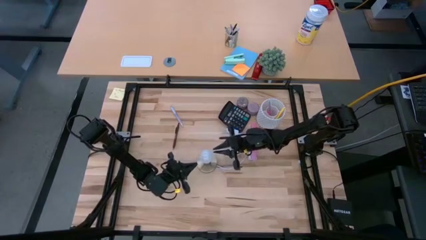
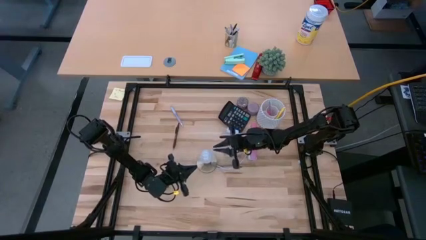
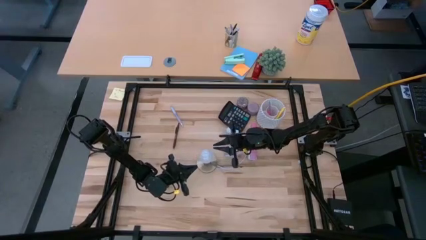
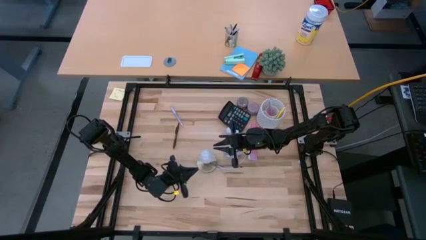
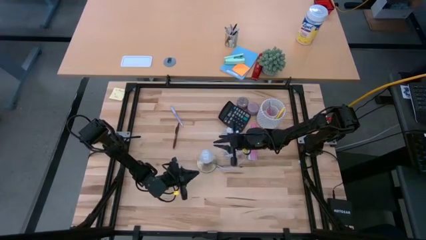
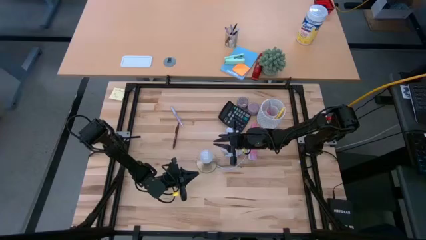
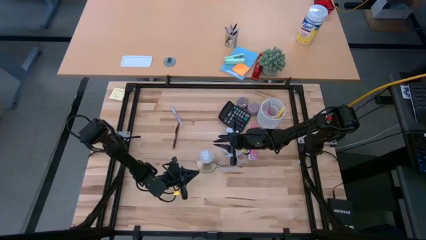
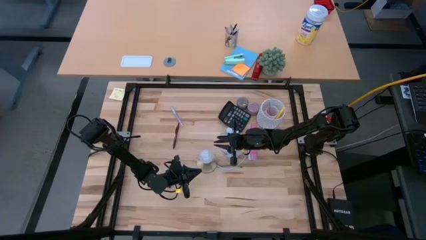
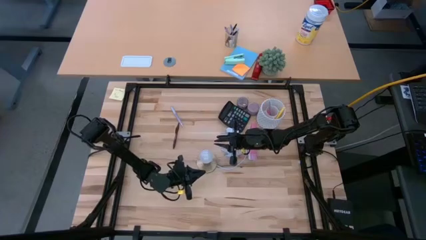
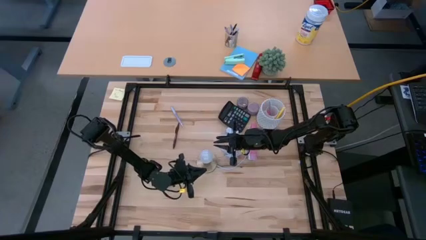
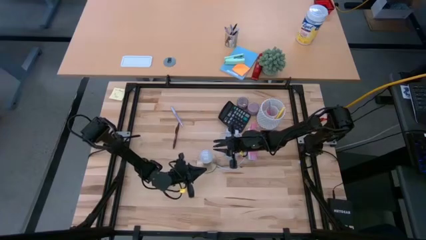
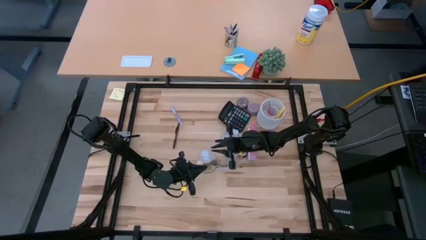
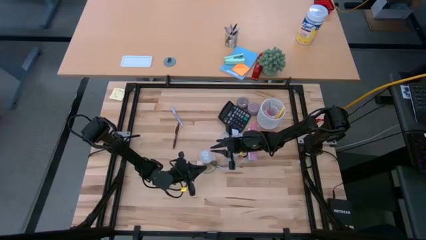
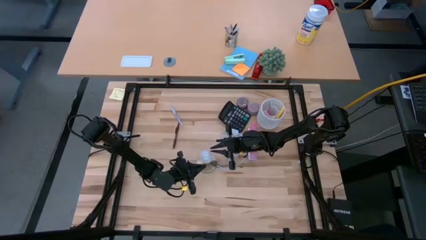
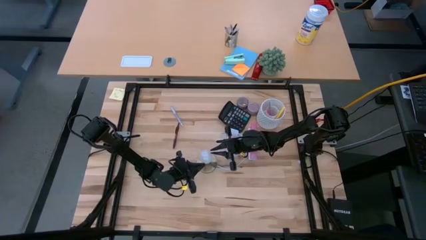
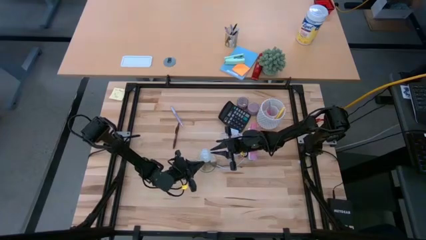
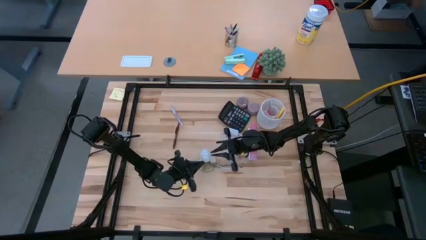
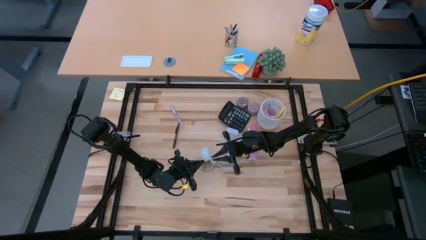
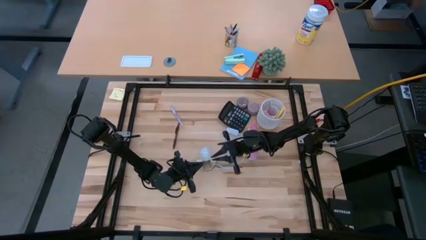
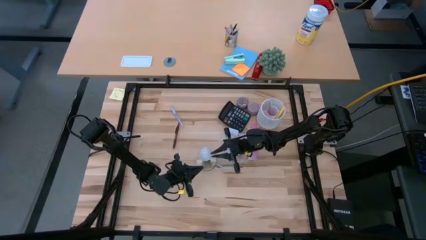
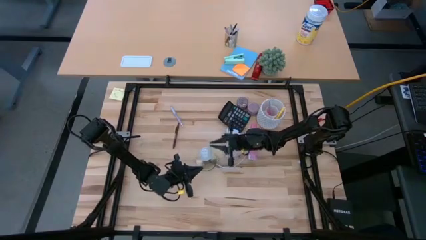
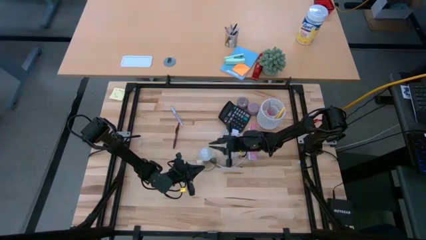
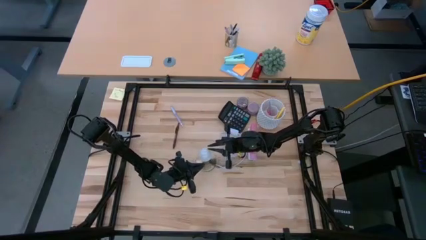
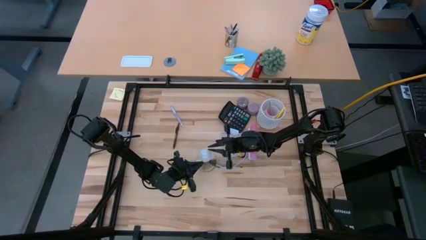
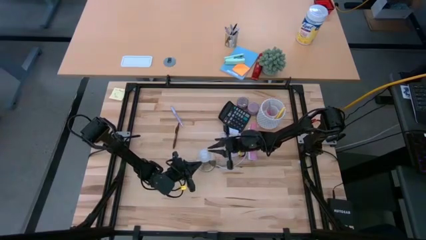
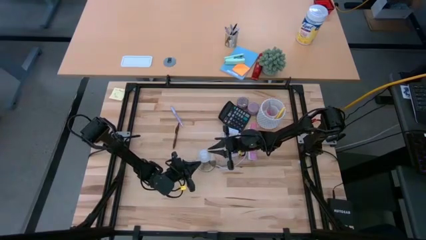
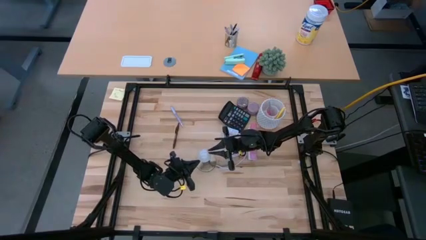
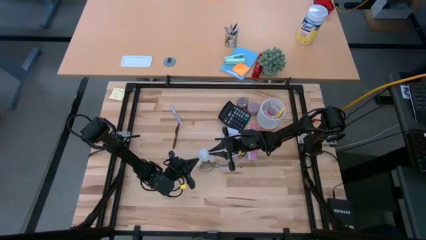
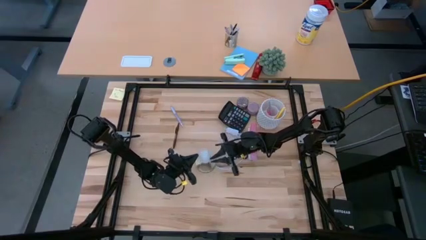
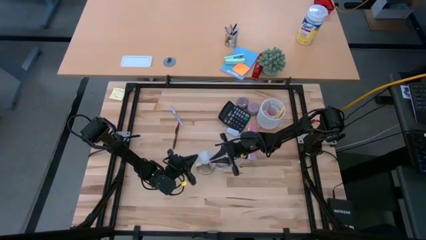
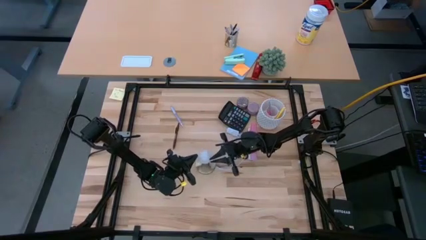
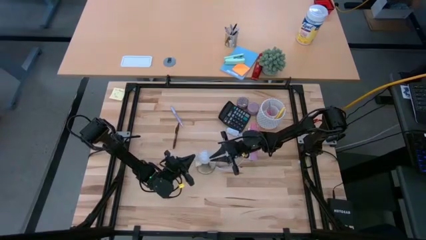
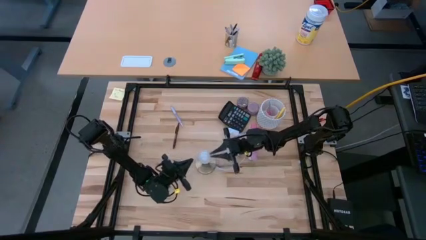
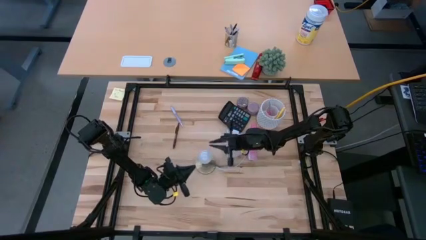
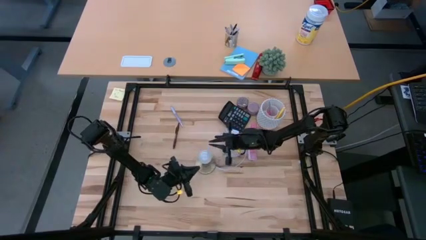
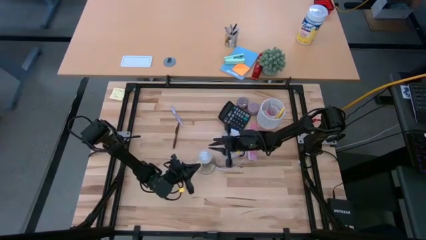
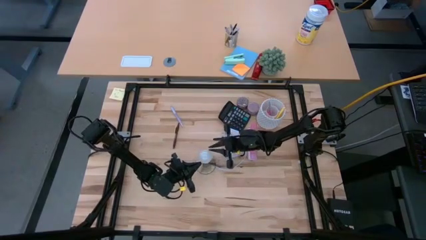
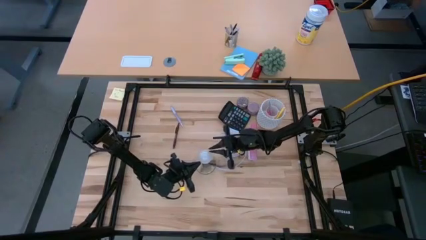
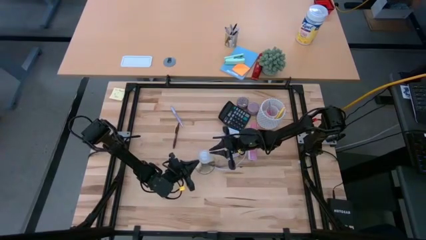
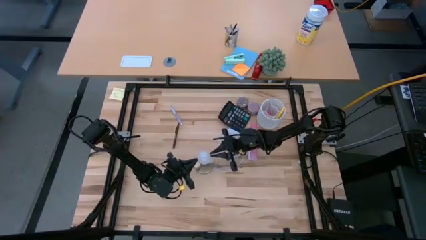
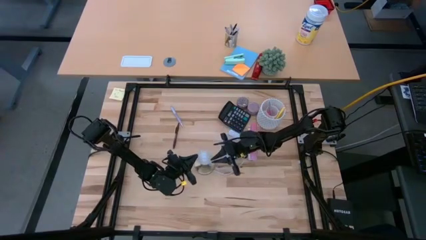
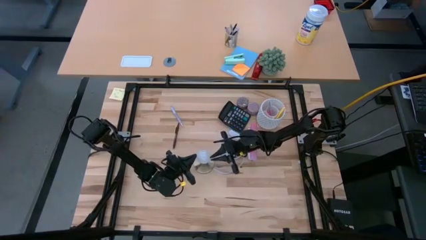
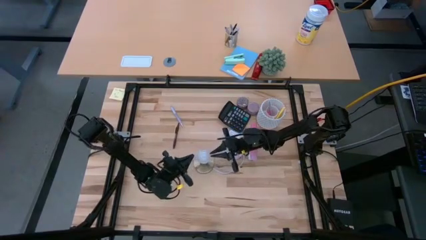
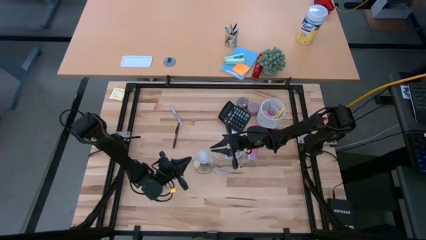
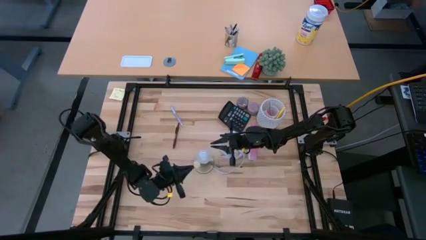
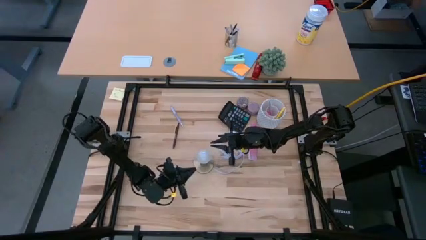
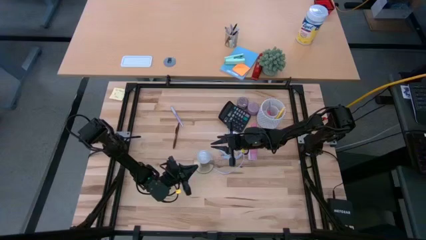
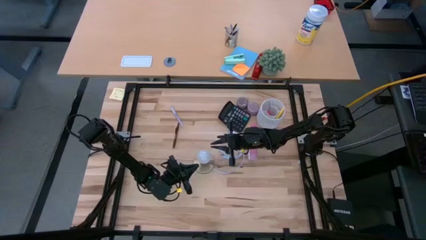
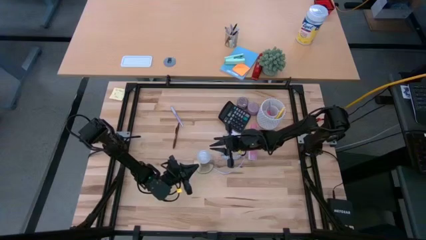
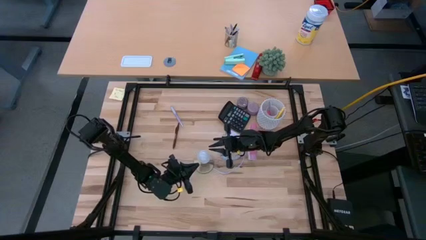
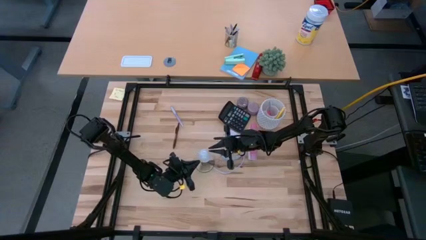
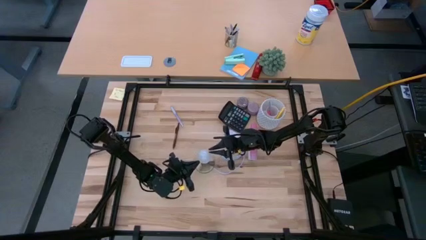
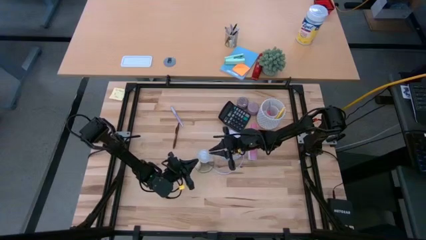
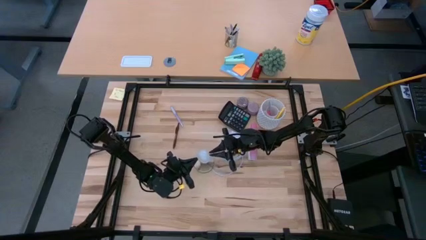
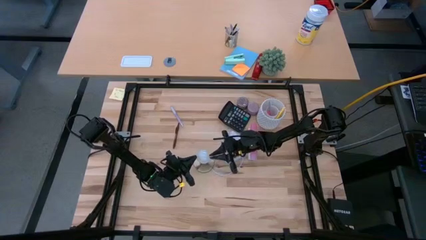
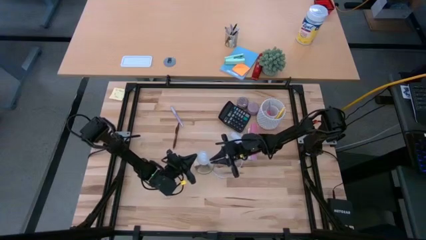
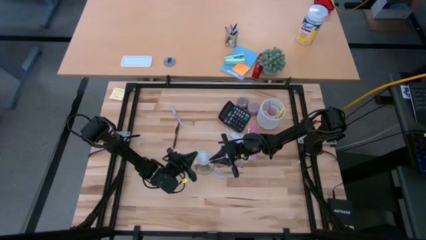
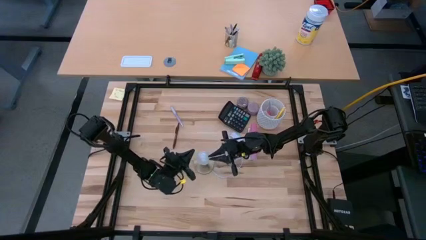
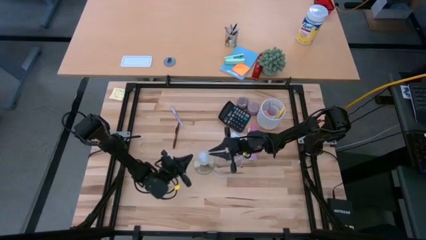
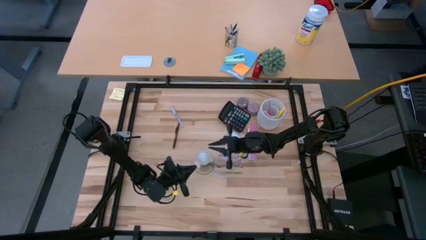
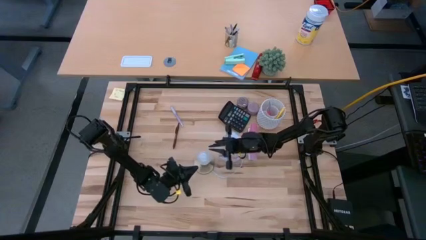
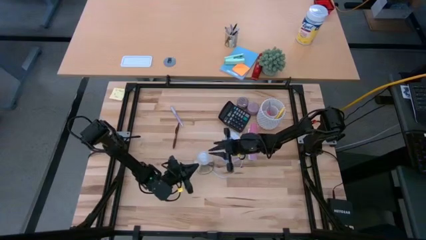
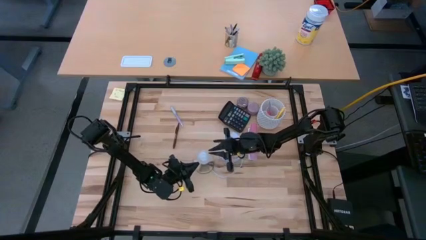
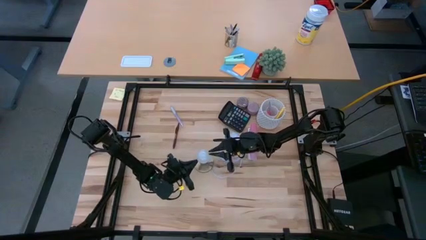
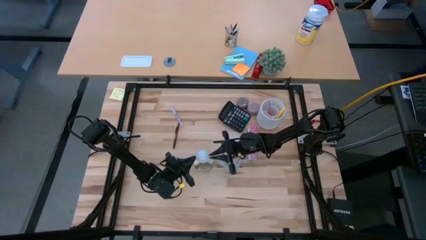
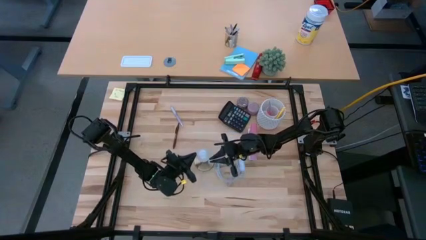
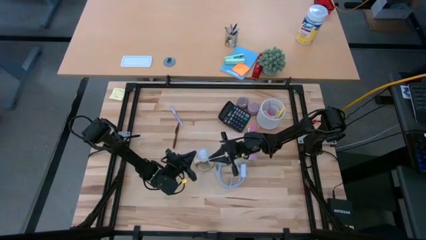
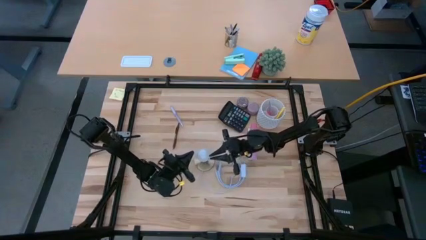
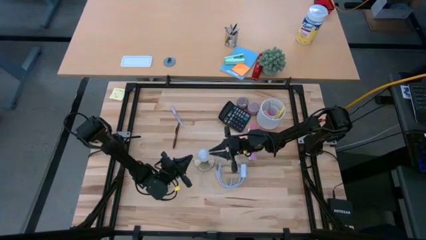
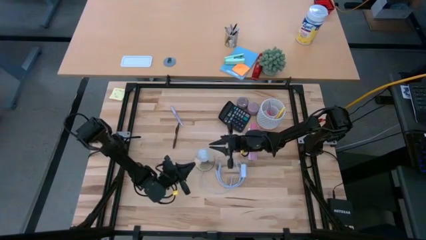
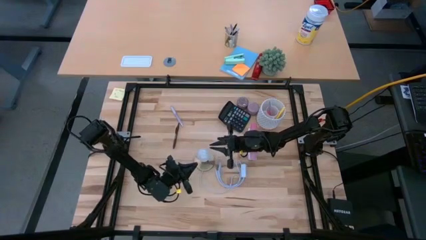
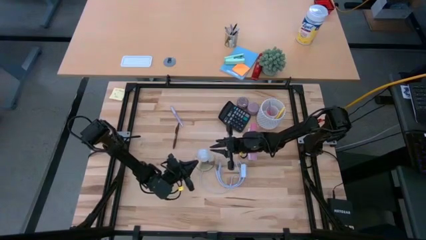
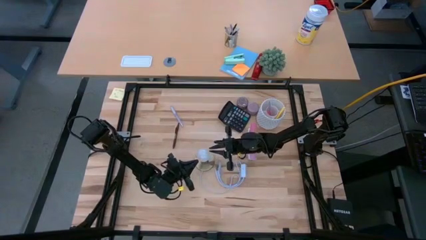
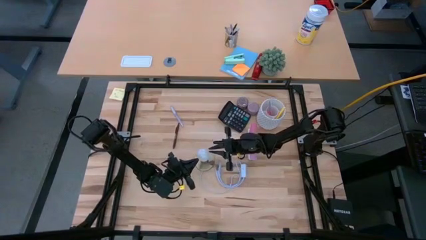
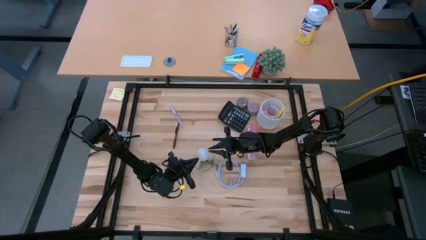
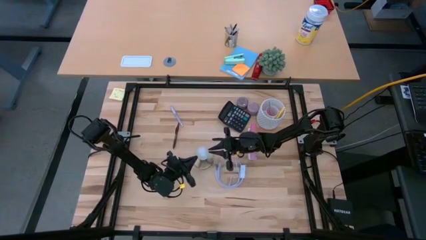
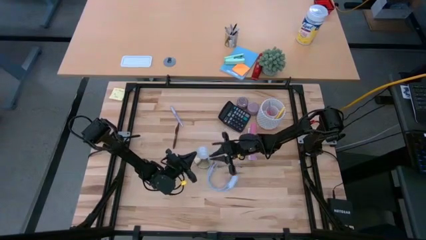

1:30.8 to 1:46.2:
Task: Screw lightbulb
Insert the lightbulb into the gold lamp
